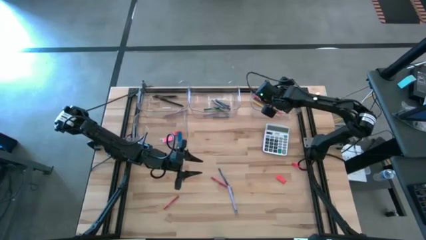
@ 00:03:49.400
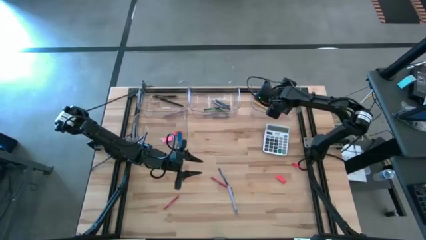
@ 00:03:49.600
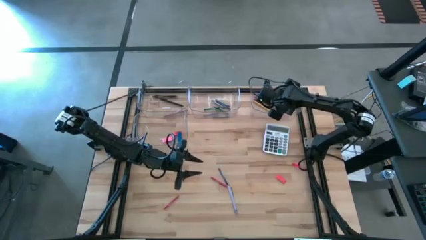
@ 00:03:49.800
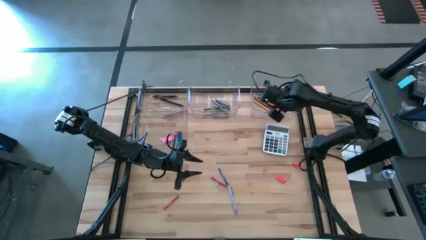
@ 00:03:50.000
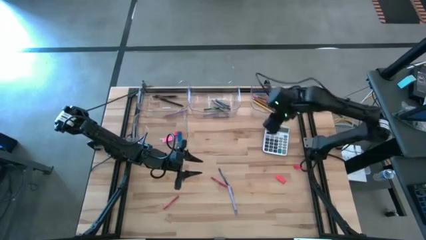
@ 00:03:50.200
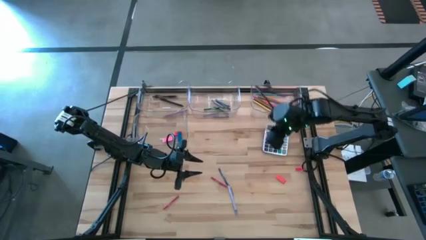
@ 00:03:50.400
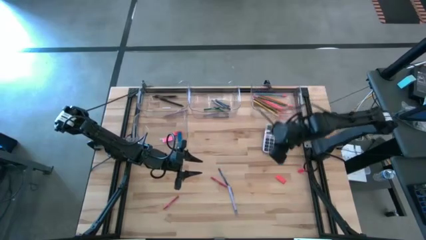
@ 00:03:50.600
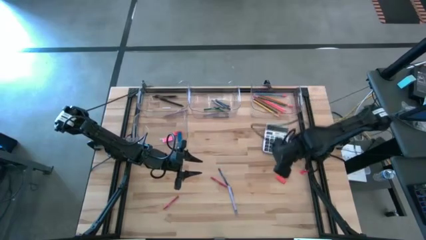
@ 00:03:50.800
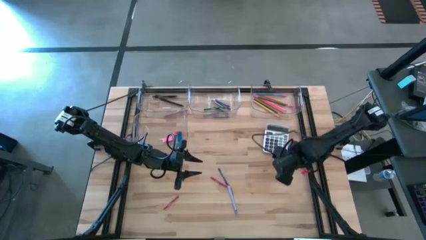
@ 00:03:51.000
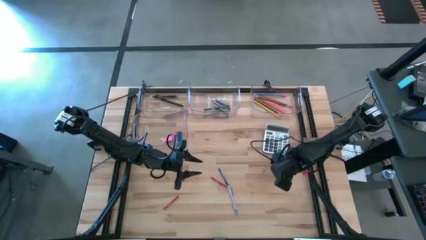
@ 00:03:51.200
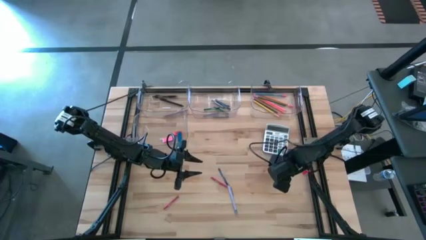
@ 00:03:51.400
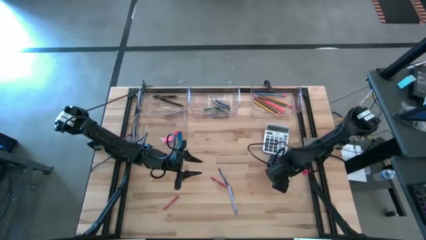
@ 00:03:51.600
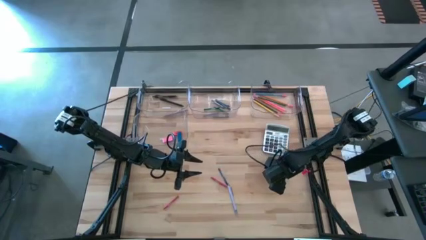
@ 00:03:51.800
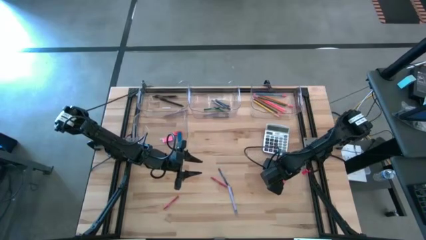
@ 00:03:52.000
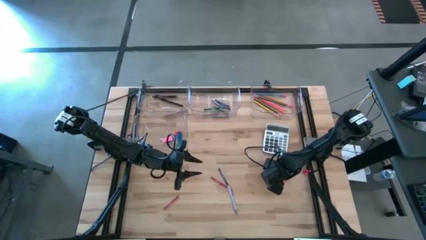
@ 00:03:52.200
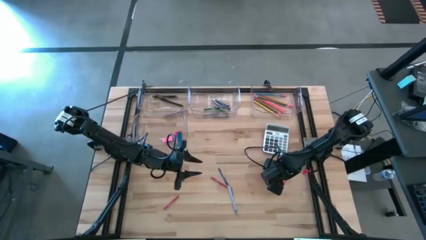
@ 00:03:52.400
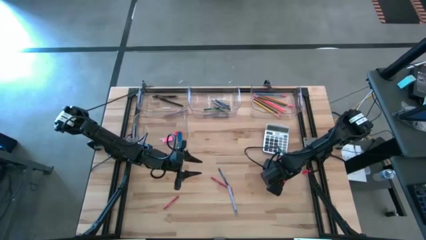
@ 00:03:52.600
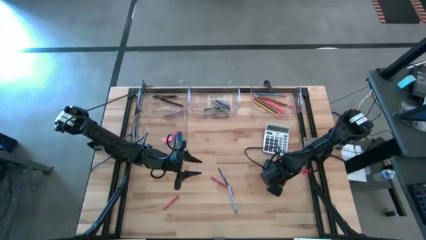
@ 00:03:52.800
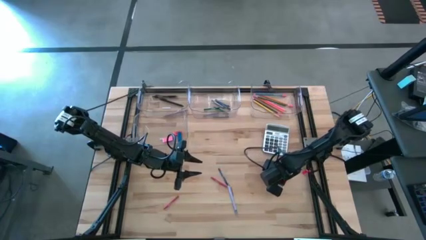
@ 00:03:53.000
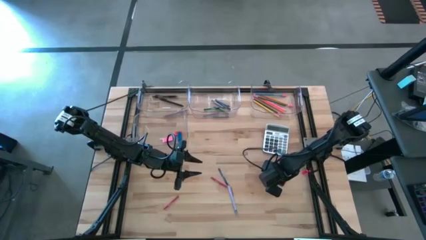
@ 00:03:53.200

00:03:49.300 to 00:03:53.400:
Task: Sort crayons/erasers/pens/pencils in bins
Put the orange eraser into the bottom transparent bin

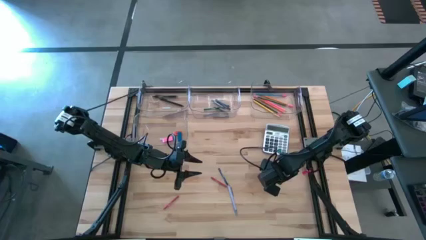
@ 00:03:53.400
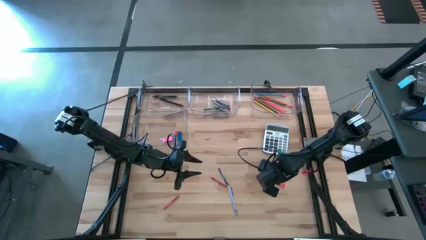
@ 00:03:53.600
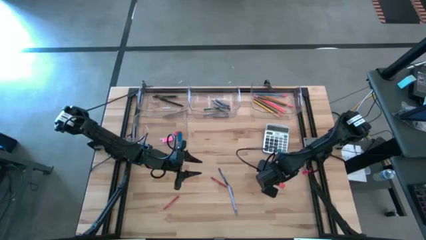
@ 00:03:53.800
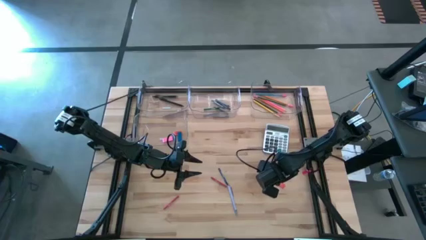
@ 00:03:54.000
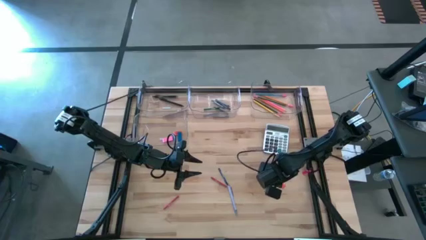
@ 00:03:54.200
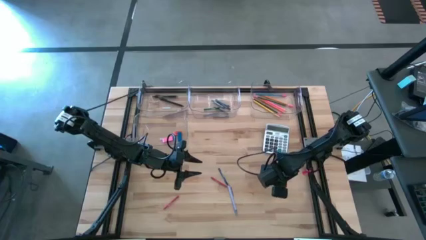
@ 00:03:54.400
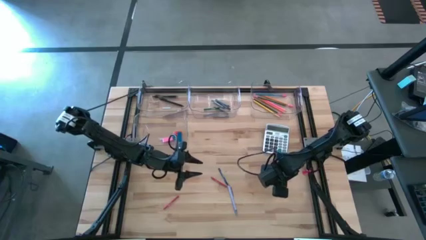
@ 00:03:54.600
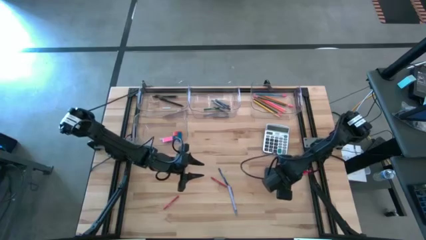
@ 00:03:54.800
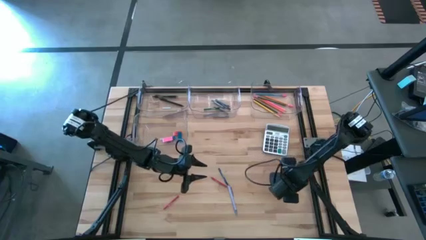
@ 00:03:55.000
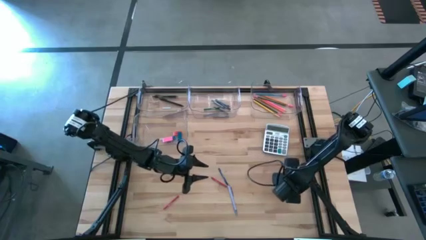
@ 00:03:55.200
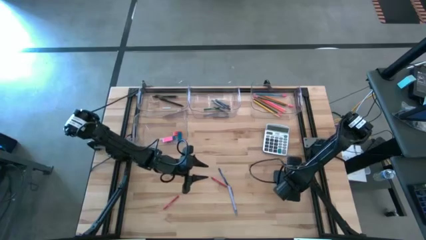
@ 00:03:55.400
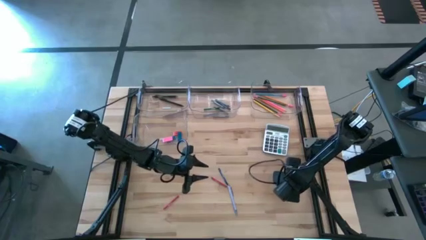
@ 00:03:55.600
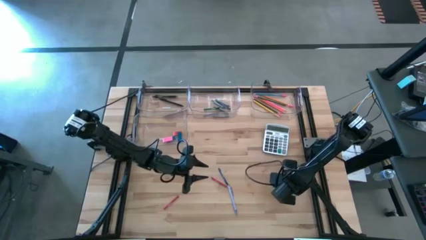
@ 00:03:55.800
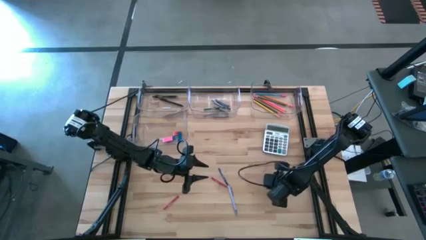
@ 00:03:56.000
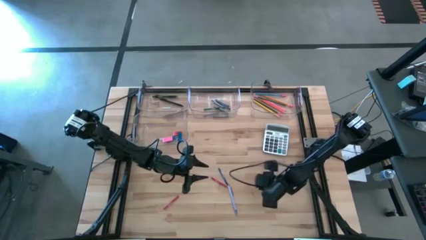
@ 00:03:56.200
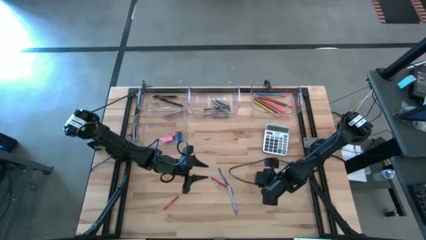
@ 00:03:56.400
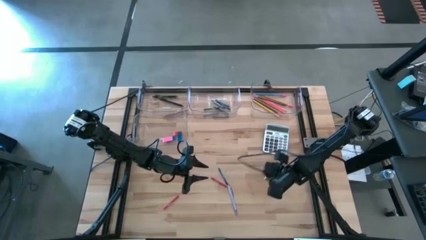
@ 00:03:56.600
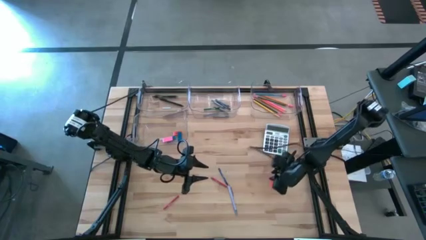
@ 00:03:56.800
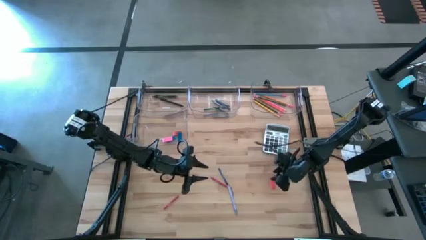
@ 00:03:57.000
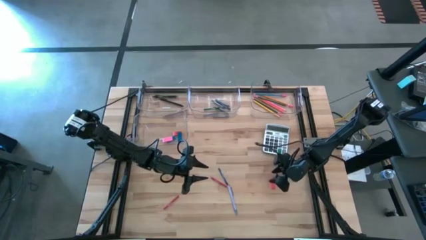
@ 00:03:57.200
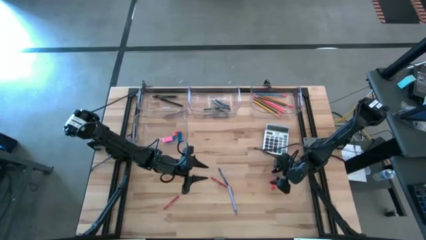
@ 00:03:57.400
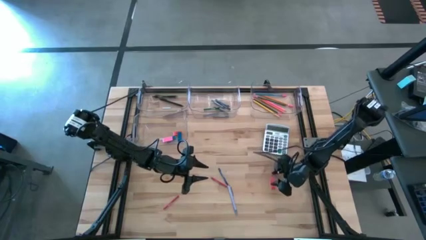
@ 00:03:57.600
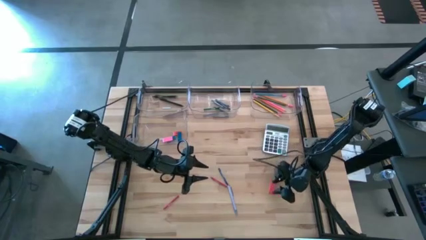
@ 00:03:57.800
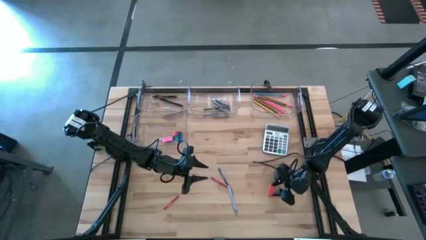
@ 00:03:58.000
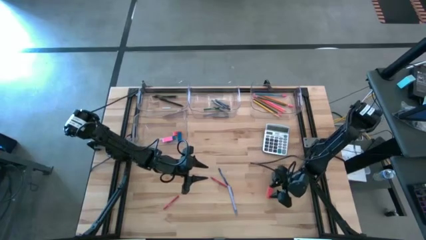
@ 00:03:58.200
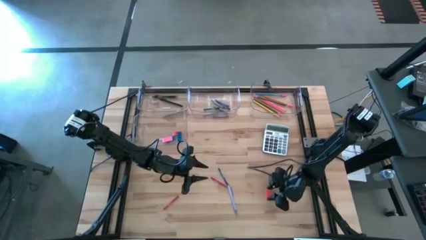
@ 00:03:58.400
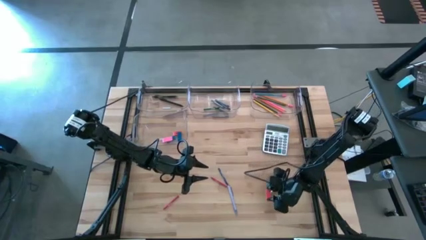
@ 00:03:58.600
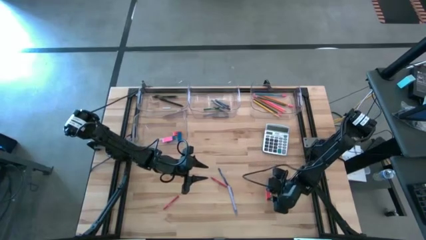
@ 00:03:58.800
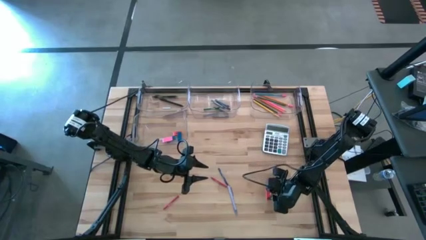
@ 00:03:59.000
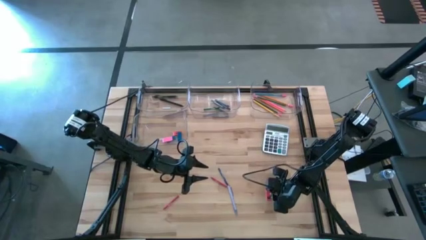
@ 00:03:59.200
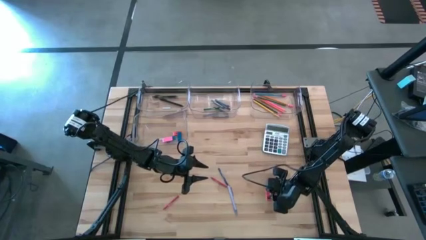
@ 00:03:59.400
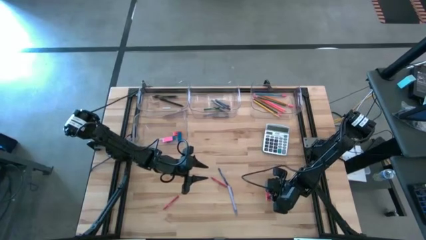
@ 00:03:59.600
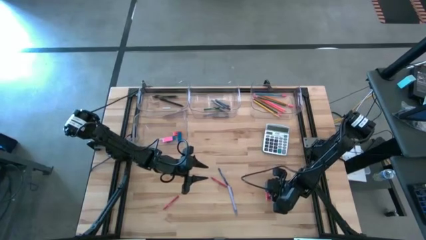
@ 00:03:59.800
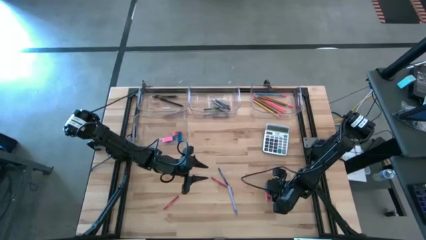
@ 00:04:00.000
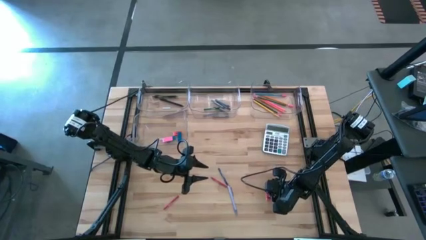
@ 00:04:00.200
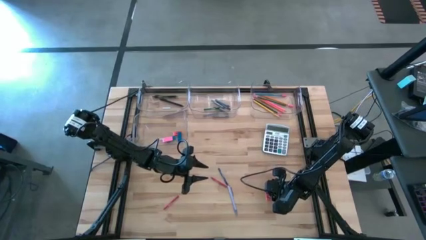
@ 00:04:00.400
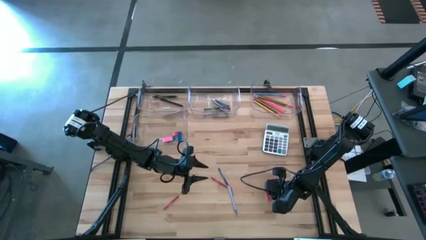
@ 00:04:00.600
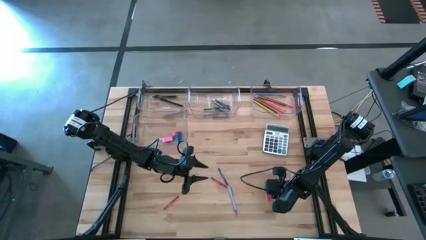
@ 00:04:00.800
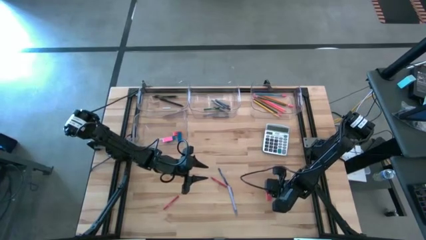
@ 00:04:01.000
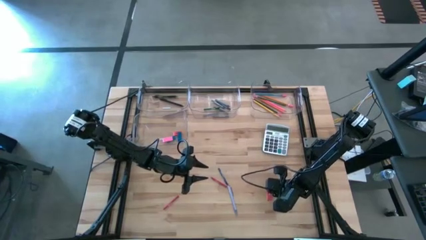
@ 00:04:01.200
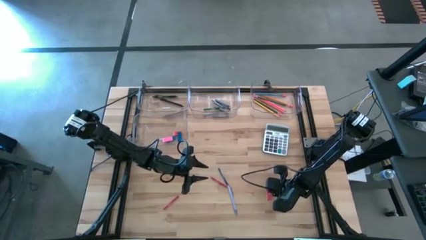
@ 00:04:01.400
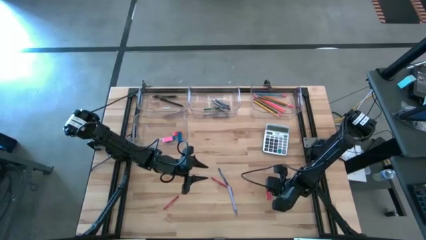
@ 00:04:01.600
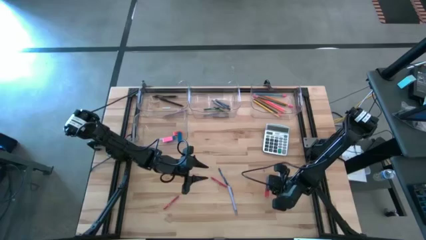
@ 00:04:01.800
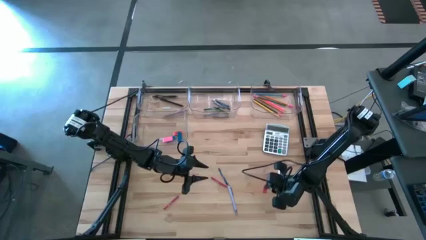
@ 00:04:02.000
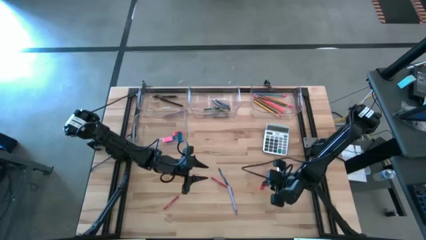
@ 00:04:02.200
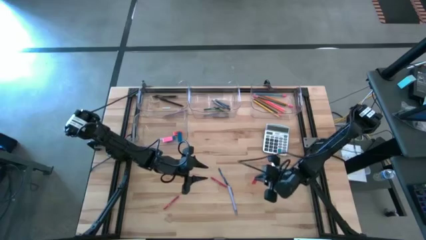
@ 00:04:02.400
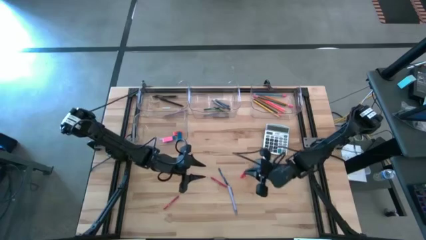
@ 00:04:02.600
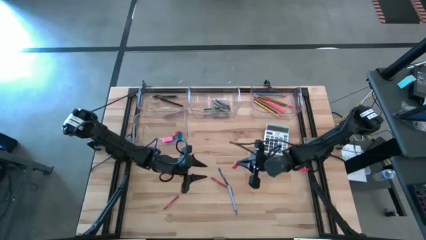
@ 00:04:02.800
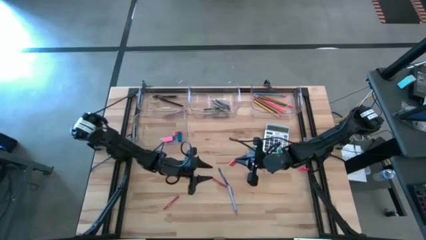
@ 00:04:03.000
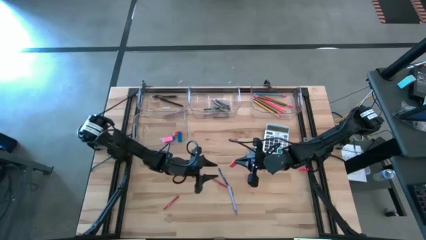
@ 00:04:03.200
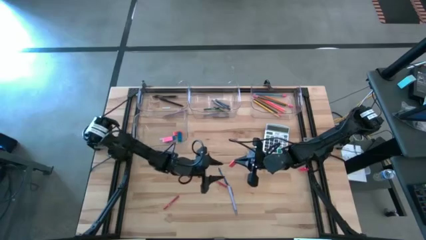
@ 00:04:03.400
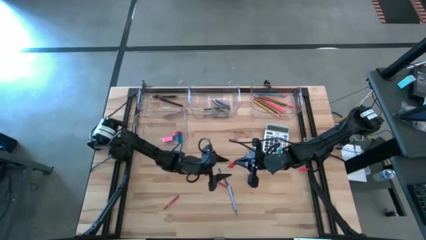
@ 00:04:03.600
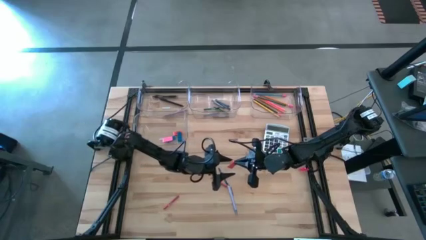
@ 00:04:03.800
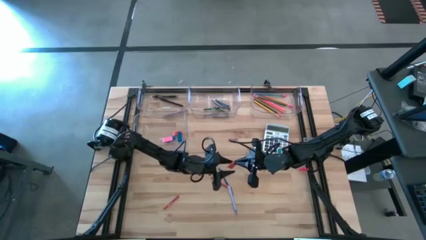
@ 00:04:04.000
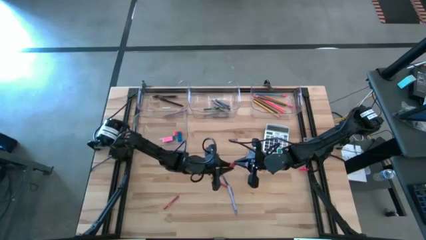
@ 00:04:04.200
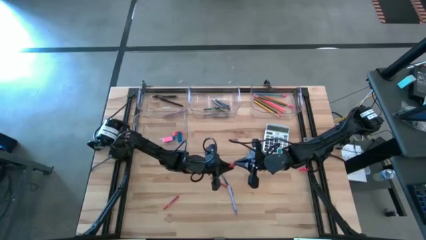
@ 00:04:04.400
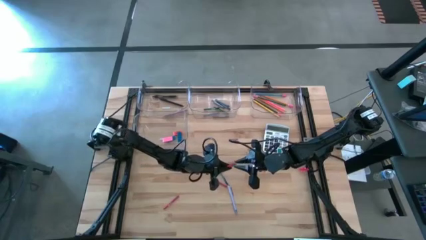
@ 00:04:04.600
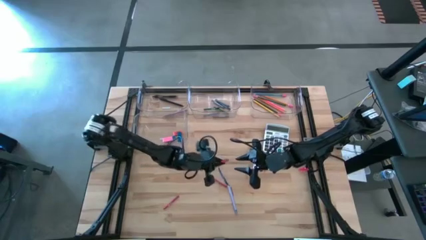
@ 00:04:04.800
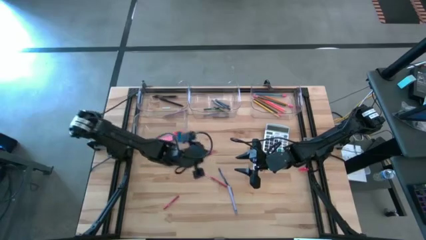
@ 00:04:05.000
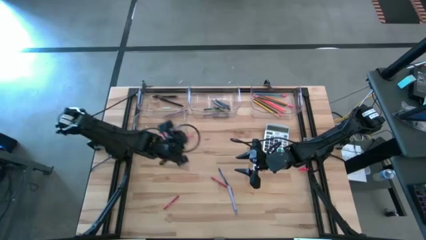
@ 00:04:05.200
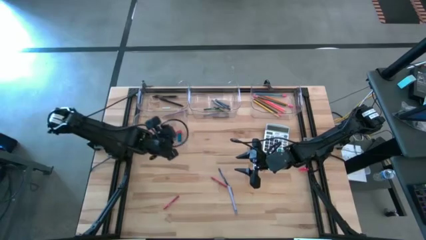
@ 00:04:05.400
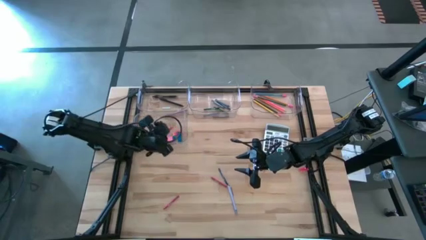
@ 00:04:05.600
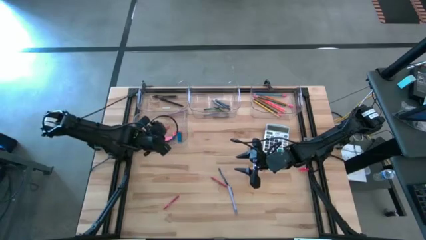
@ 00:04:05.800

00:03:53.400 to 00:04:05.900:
Put the orange eraser into the bottom transparent bin
